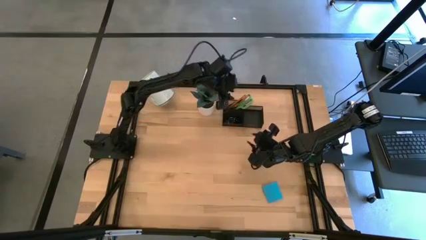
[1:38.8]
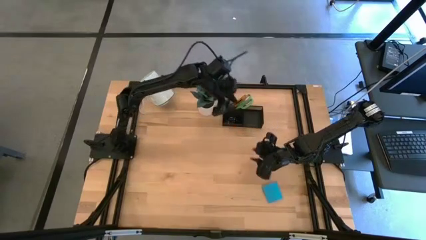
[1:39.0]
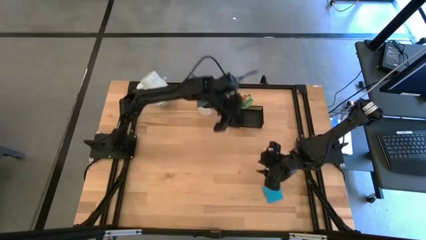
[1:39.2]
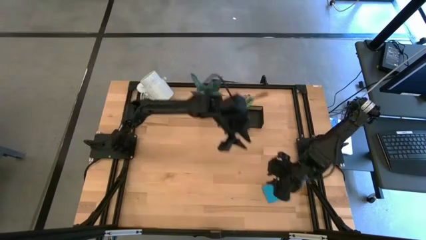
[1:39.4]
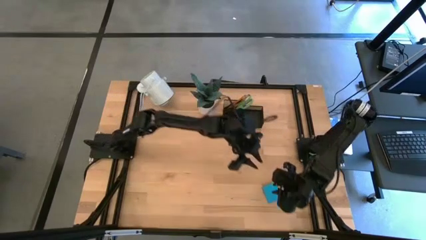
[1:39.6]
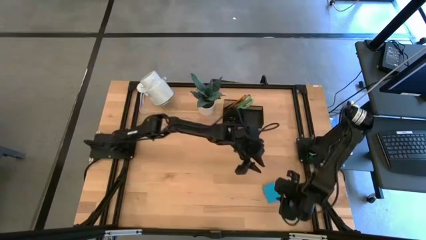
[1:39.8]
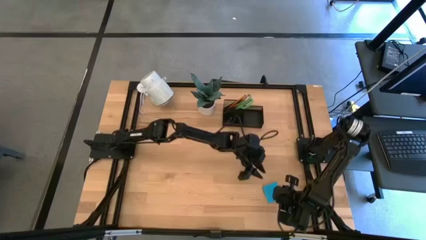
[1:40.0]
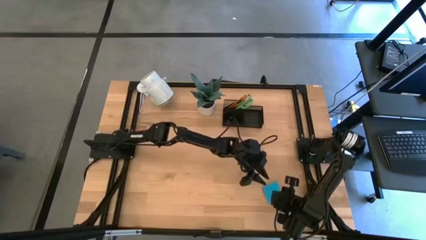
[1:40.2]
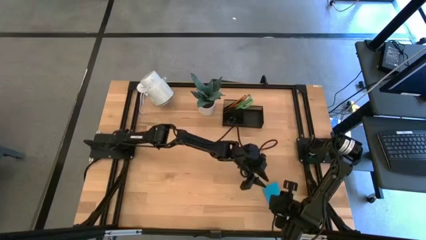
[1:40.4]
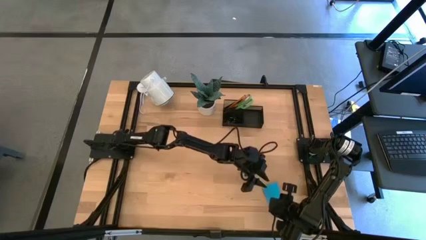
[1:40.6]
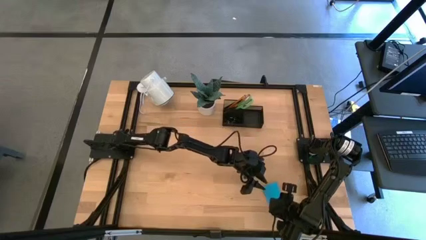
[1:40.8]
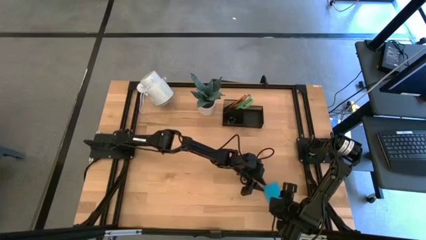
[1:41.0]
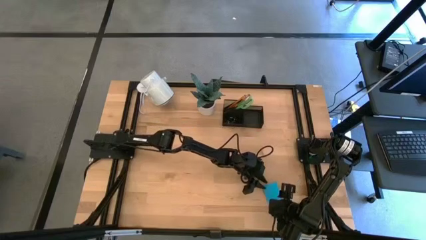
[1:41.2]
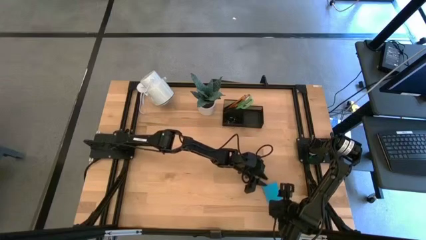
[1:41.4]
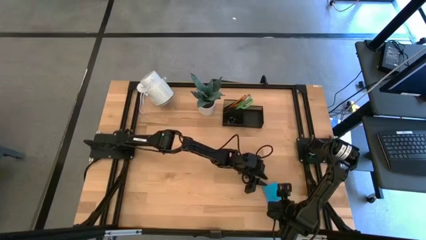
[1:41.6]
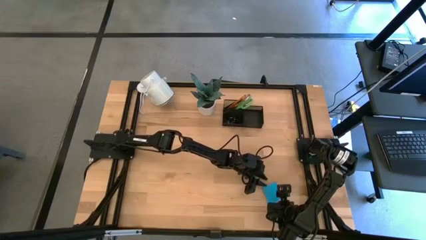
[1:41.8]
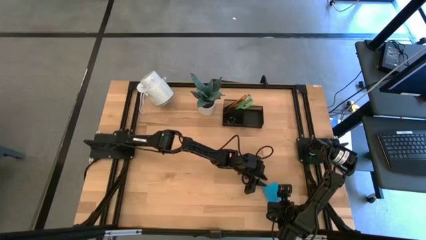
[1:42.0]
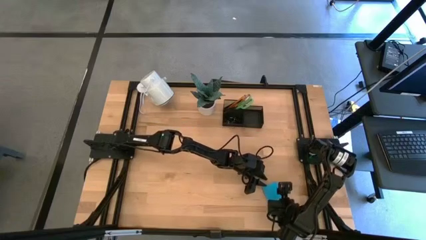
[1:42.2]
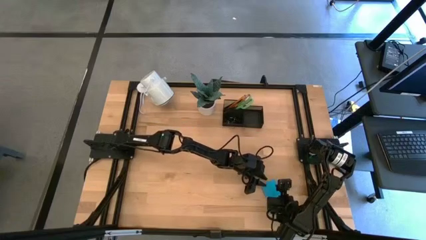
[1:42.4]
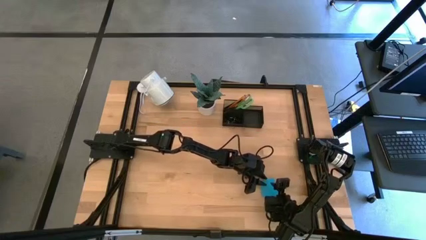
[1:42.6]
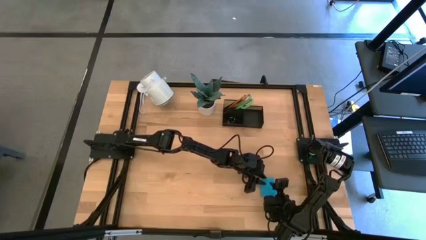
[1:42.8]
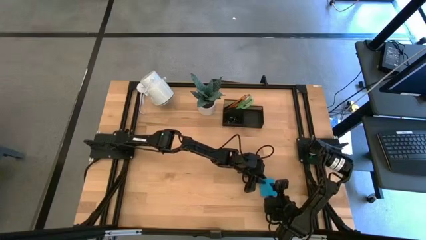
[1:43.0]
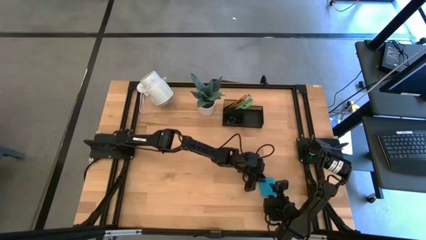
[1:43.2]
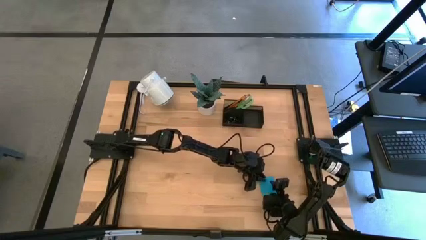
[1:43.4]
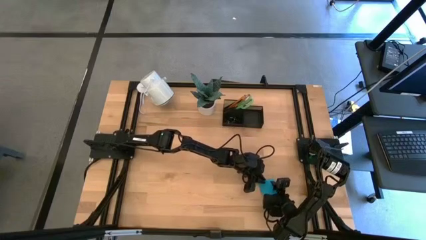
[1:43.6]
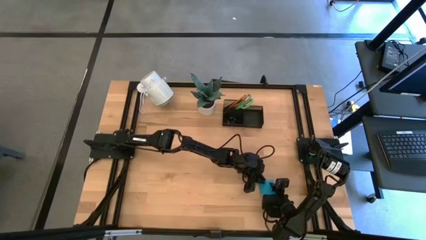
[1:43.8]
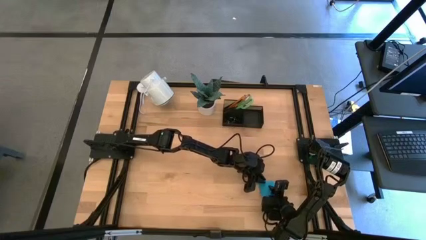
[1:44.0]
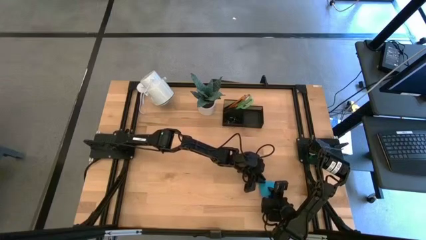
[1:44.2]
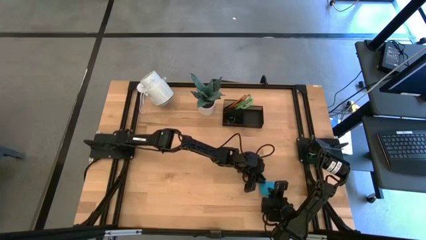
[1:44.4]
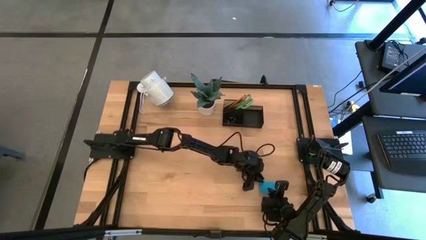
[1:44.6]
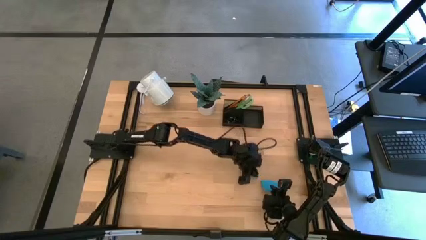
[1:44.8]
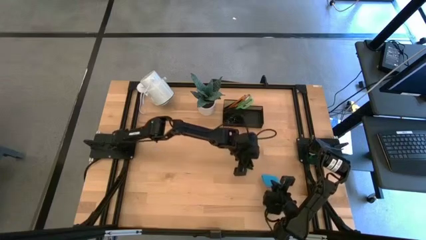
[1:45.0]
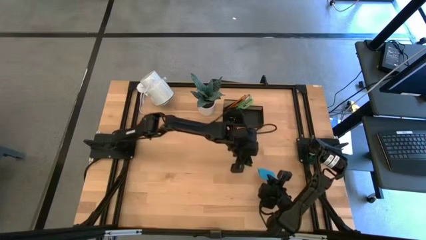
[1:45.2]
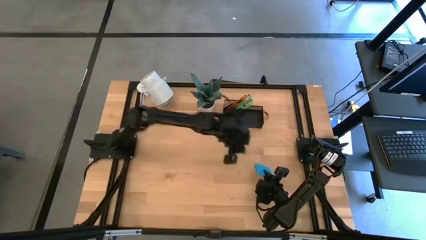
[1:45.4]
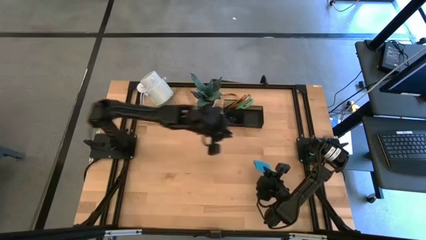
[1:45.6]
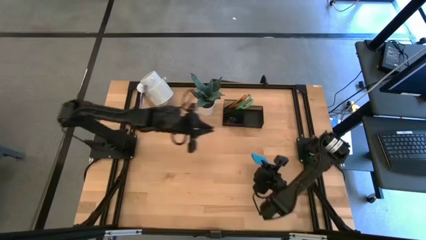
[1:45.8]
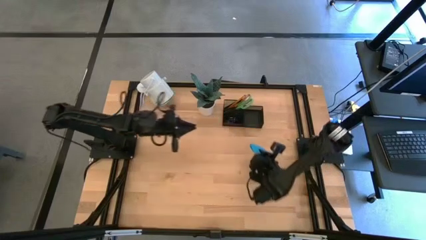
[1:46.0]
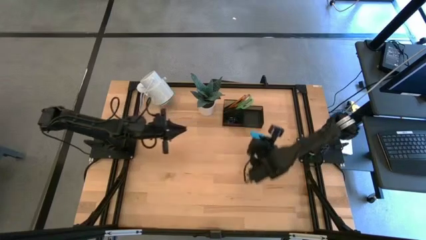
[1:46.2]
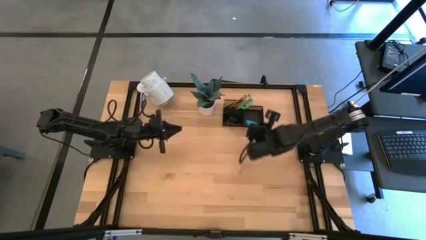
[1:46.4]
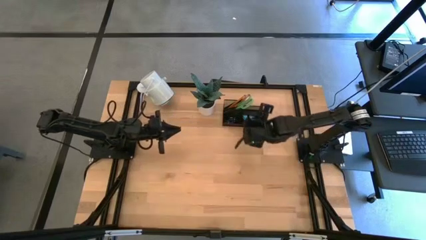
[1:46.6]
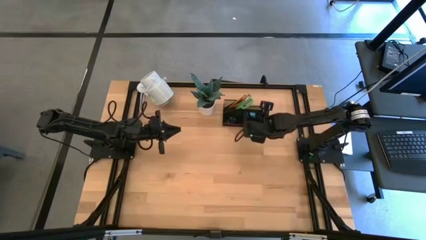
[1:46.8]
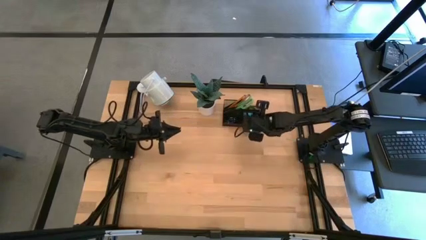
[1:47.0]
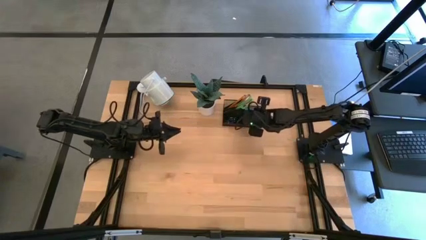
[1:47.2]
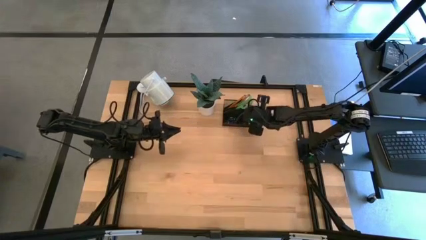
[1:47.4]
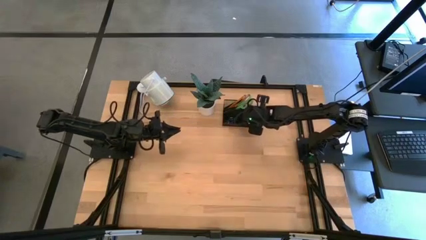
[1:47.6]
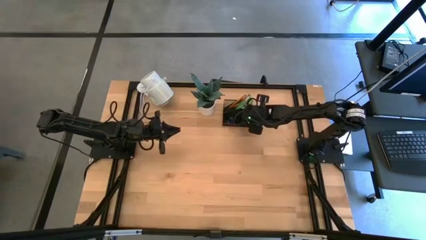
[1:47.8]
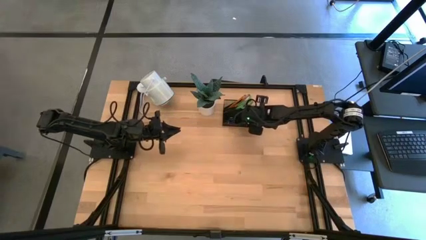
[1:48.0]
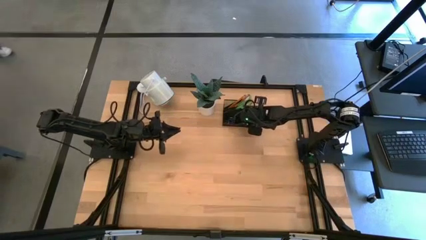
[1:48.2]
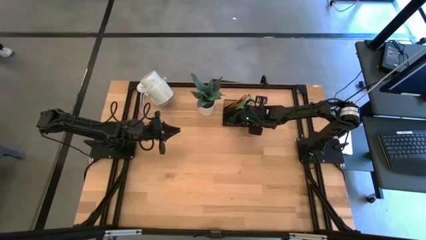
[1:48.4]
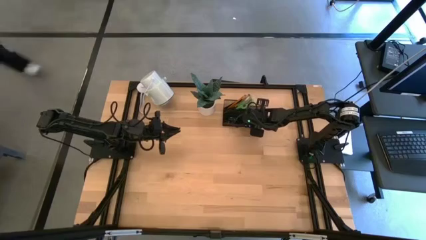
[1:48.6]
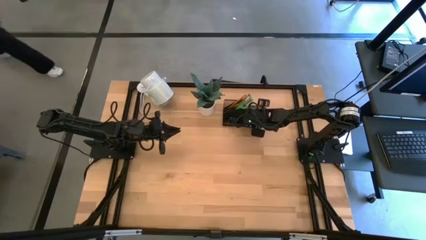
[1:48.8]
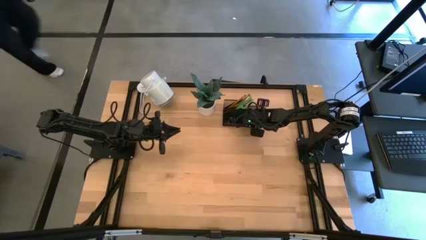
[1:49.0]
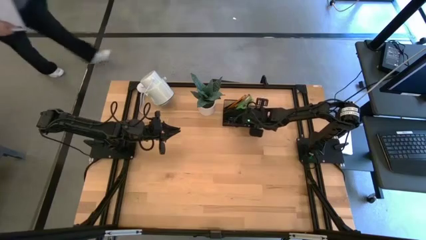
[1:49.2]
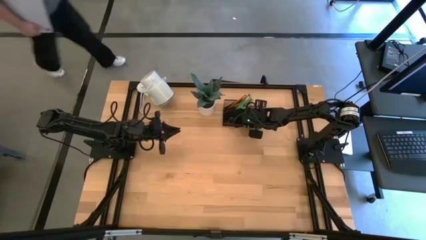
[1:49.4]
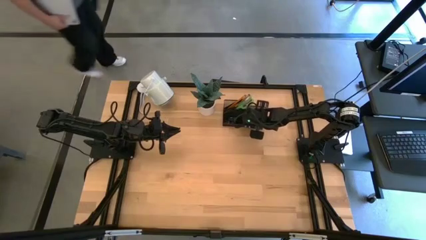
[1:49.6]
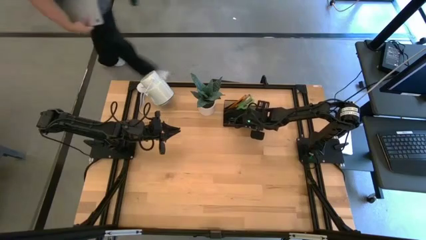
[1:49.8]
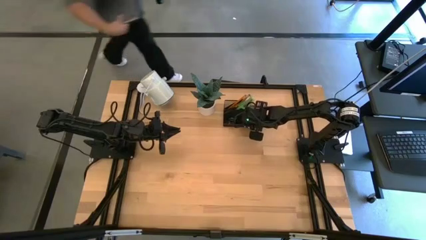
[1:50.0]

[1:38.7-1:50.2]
Task: Pick and place office supplies into organizer
Put the blue sticky notes into the desk organizer
